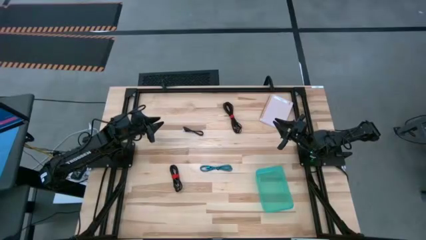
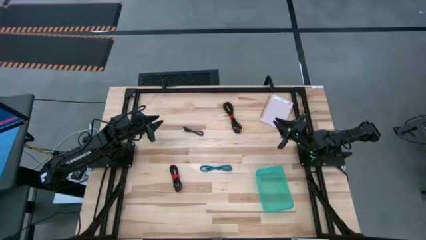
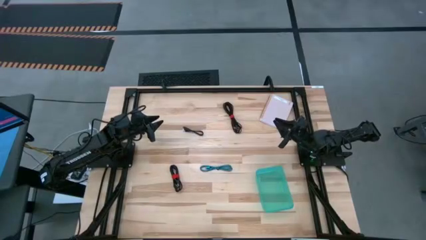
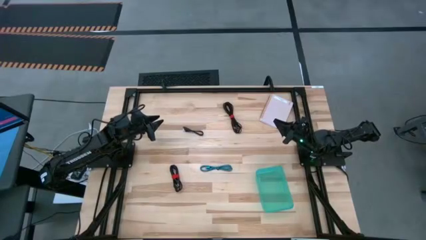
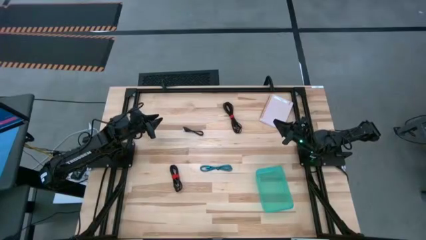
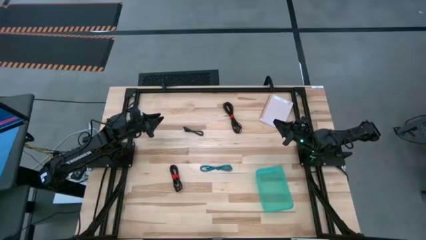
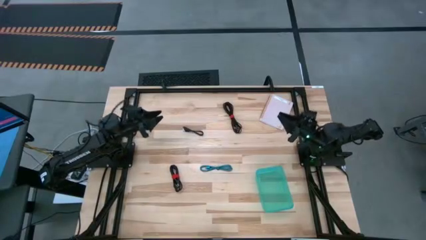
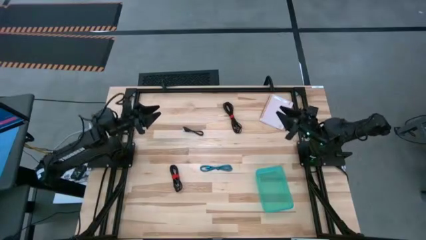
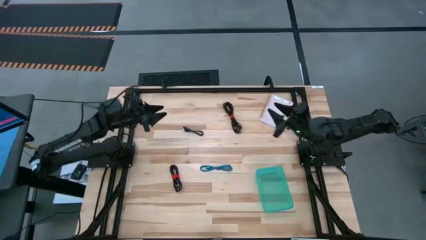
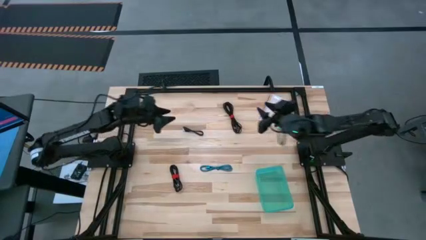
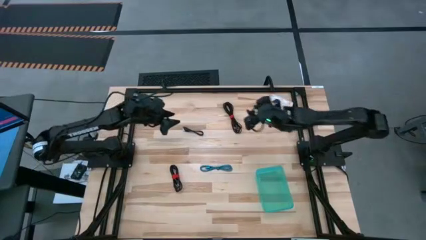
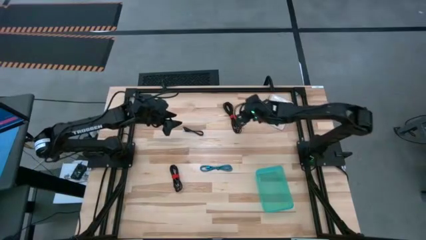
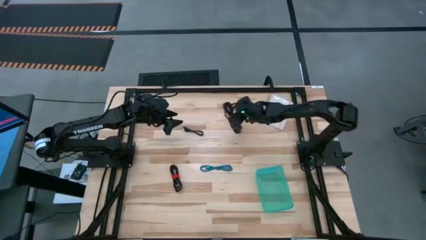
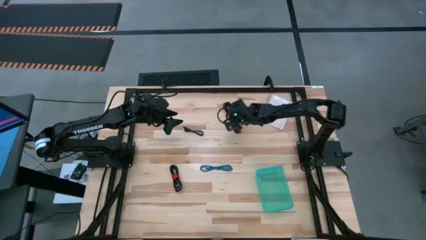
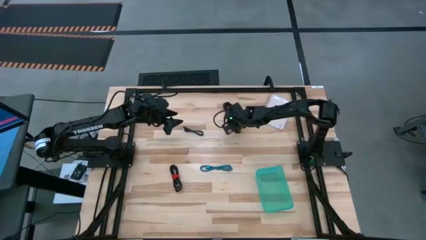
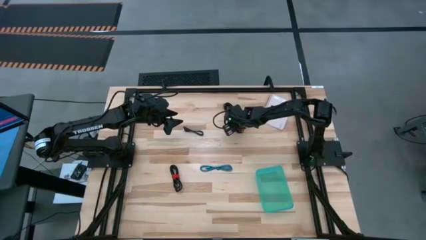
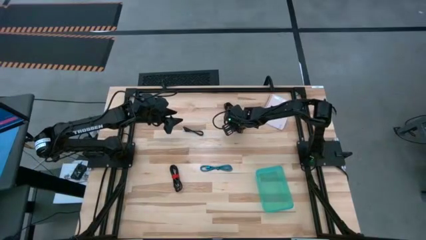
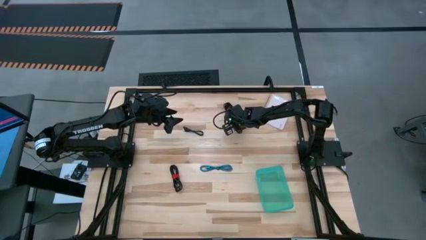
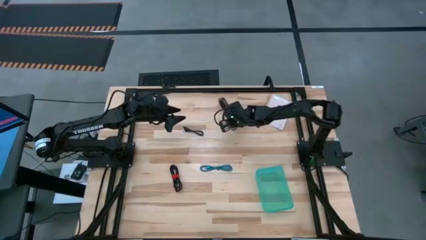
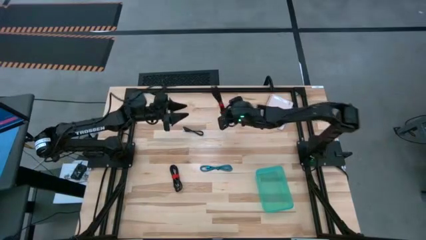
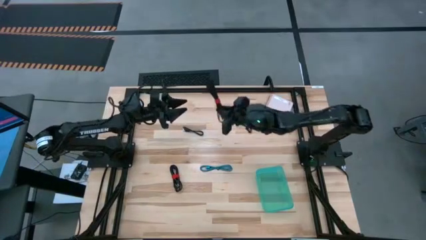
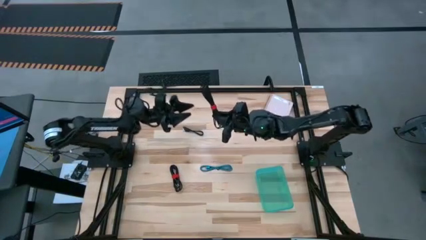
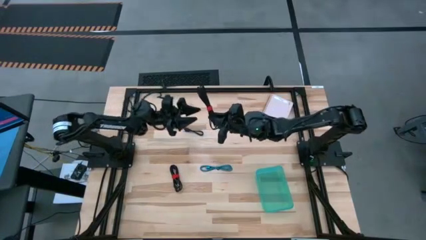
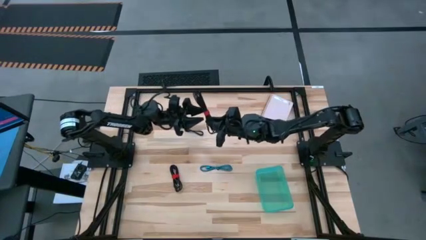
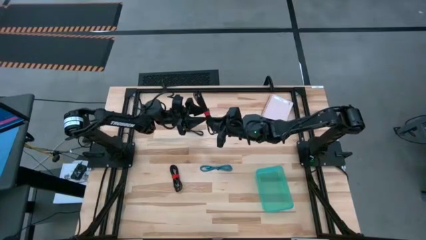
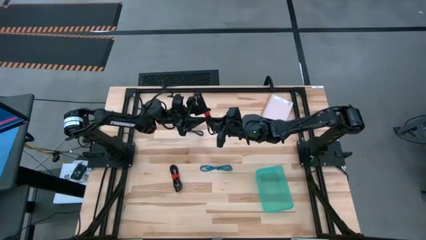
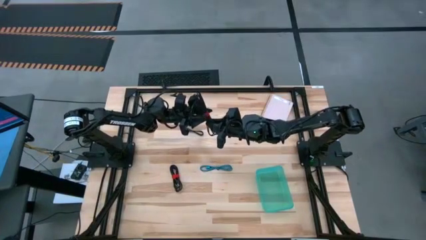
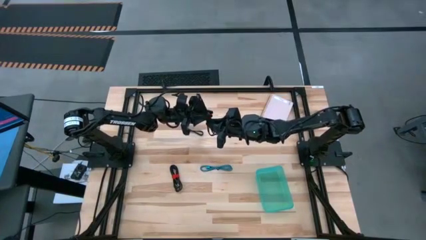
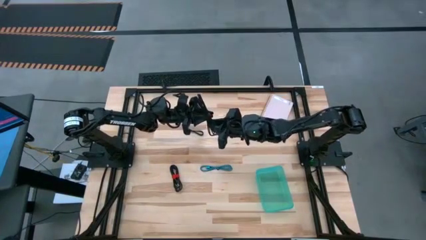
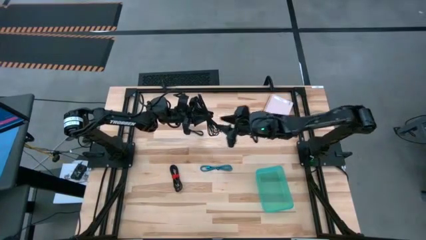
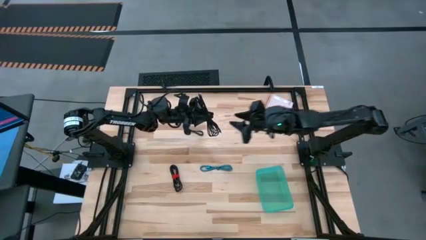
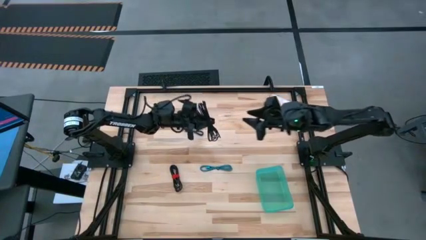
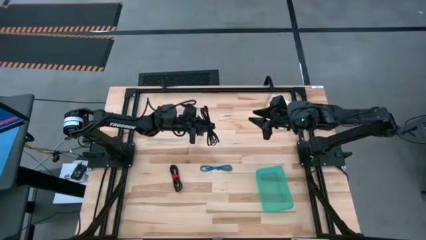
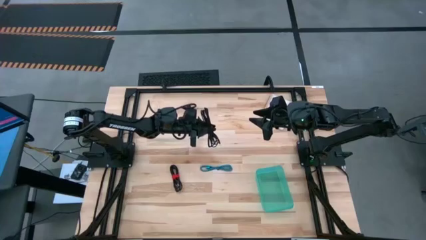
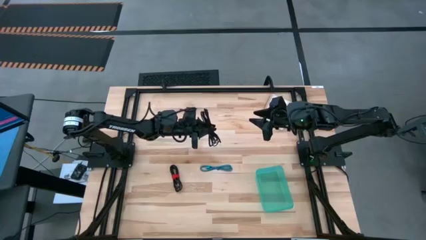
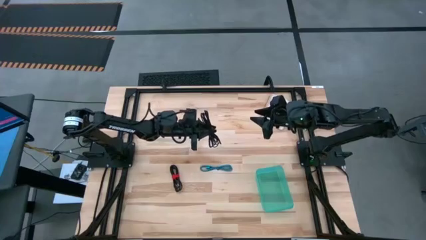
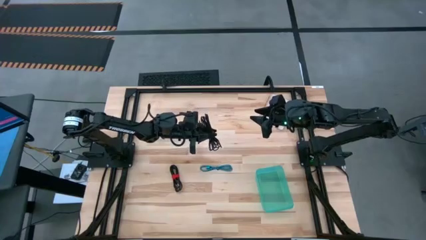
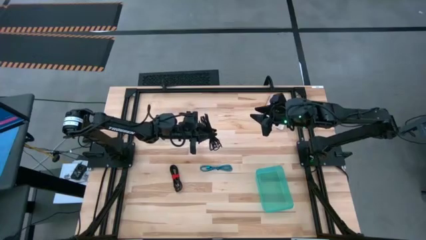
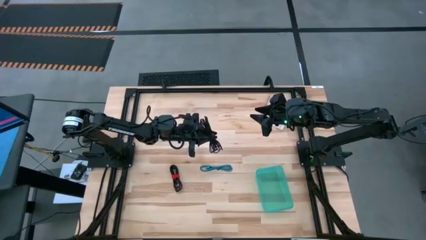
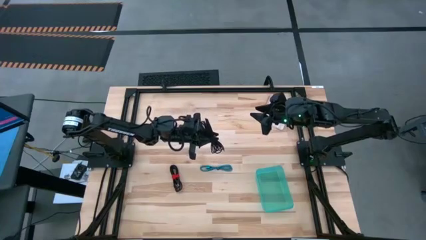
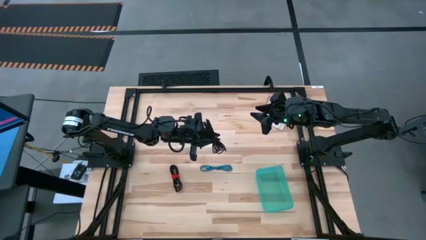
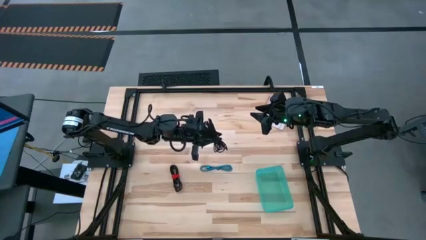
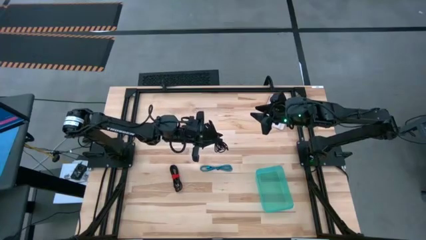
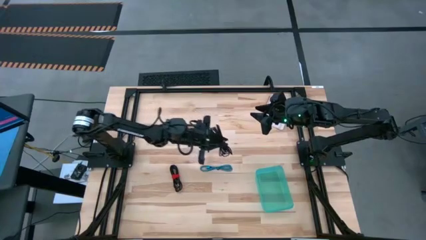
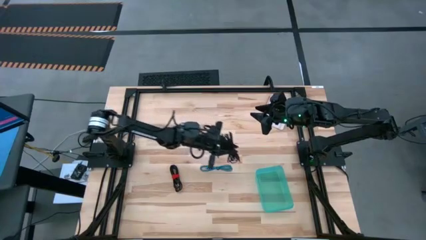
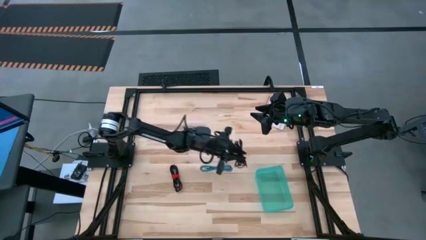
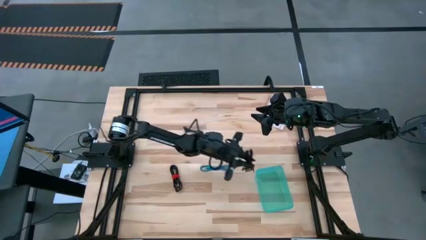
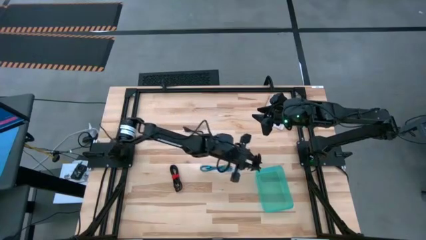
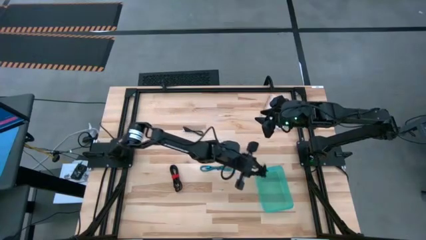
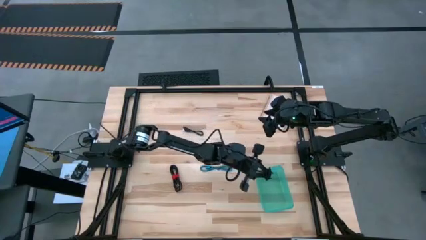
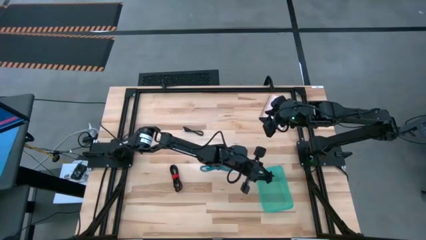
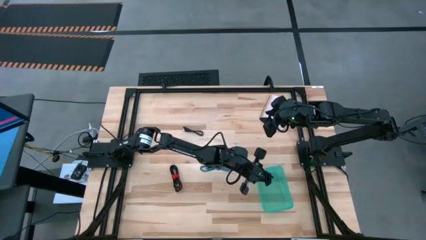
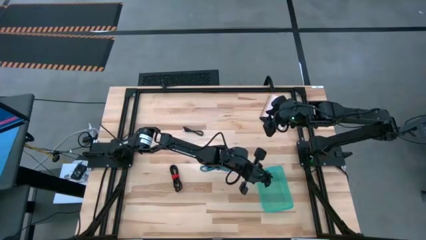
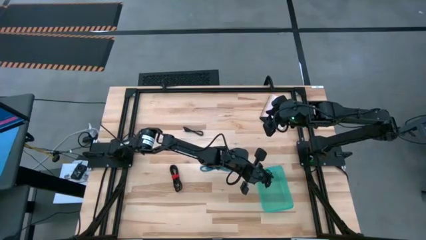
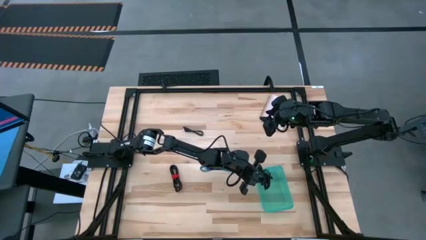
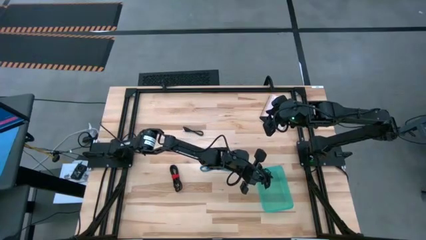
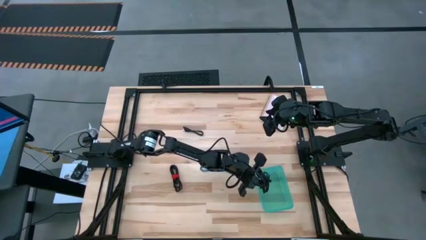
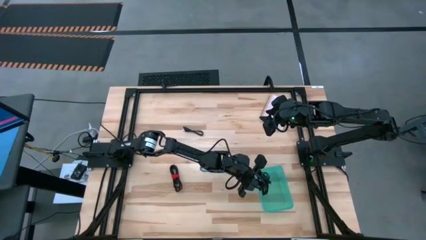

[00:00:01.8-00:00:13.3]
Task: Pick and place USB-C Cables
Put the top right black charger cable into the green bin
